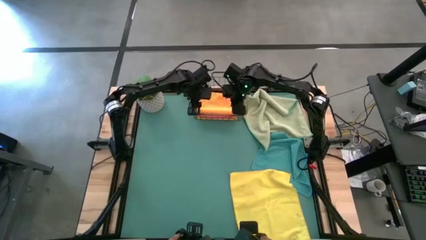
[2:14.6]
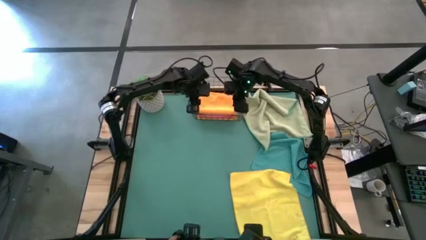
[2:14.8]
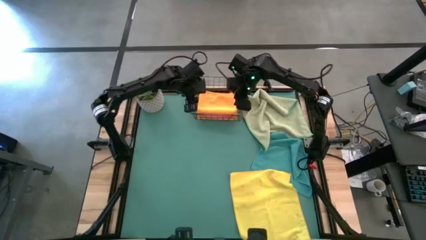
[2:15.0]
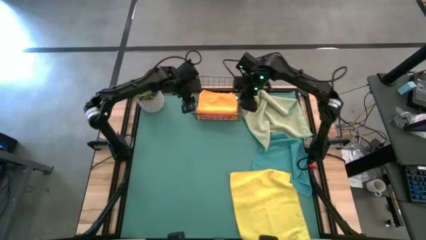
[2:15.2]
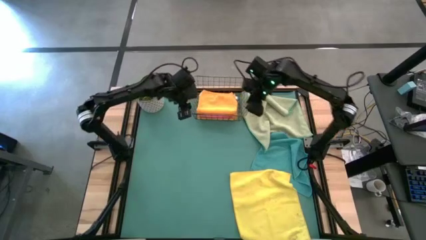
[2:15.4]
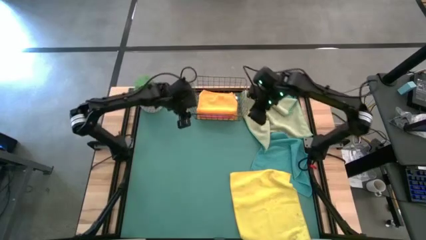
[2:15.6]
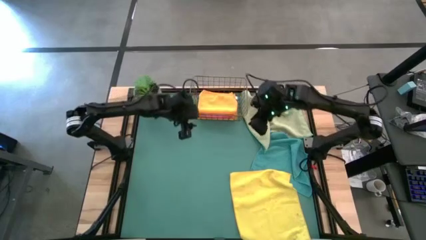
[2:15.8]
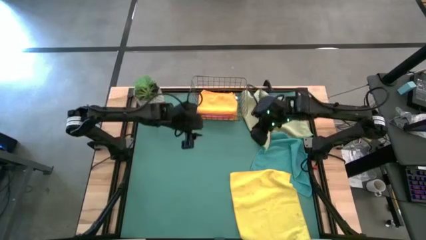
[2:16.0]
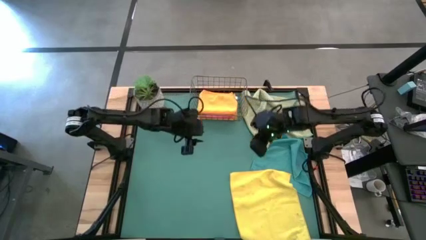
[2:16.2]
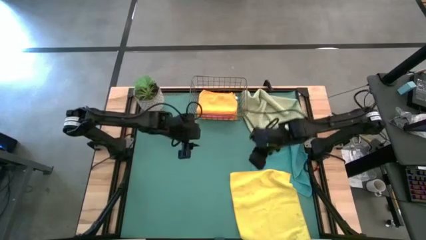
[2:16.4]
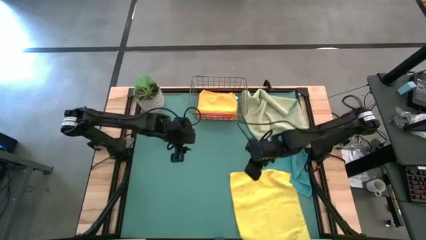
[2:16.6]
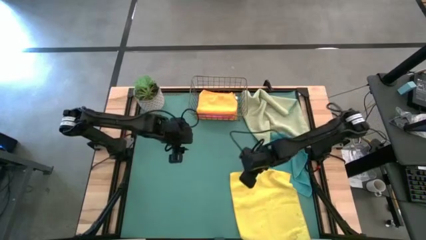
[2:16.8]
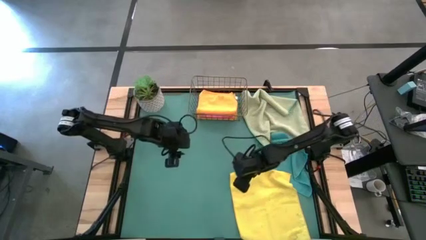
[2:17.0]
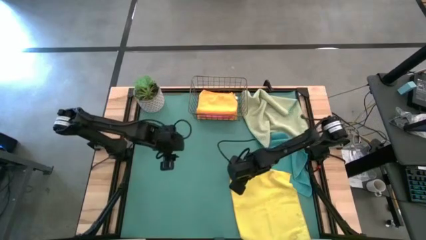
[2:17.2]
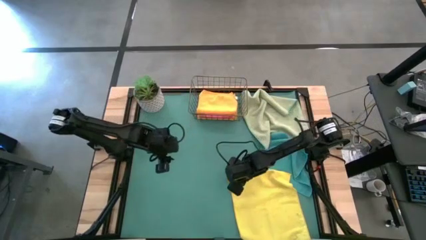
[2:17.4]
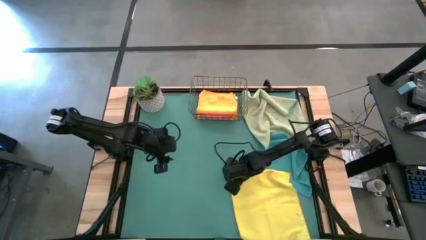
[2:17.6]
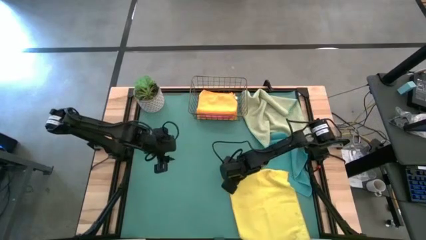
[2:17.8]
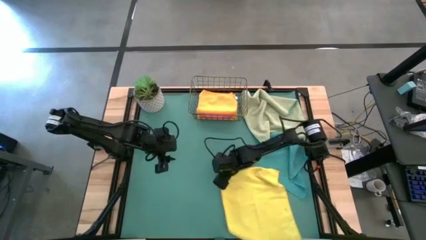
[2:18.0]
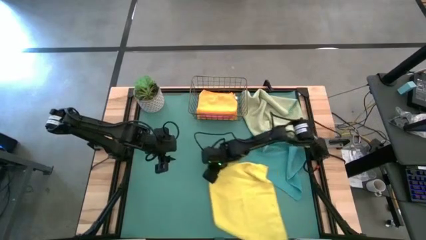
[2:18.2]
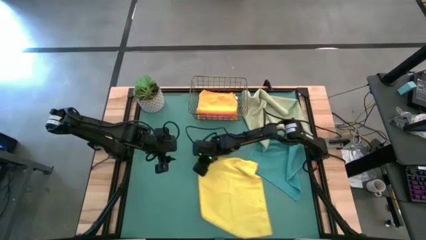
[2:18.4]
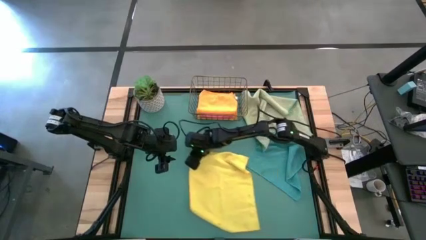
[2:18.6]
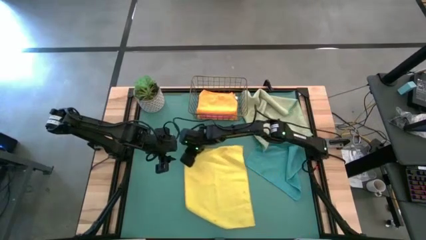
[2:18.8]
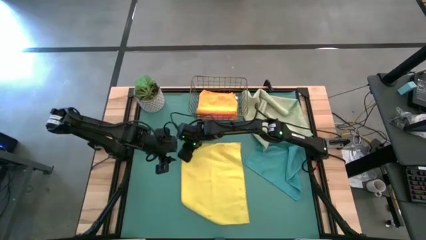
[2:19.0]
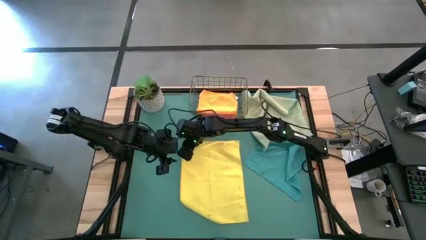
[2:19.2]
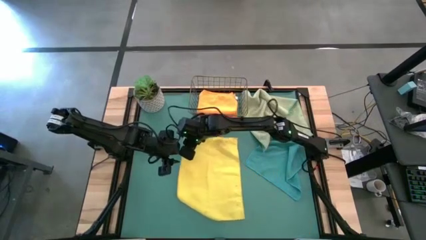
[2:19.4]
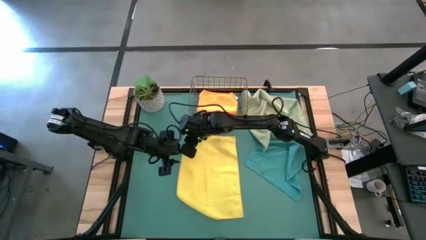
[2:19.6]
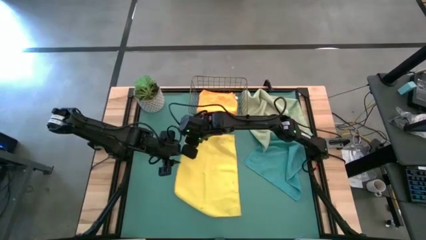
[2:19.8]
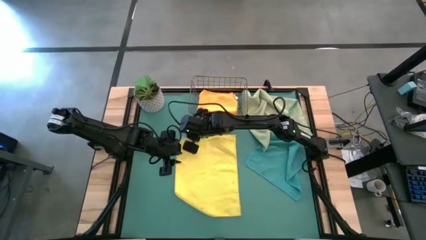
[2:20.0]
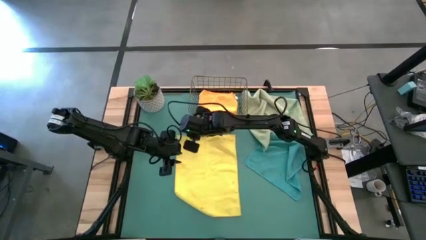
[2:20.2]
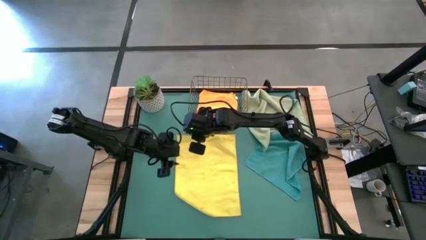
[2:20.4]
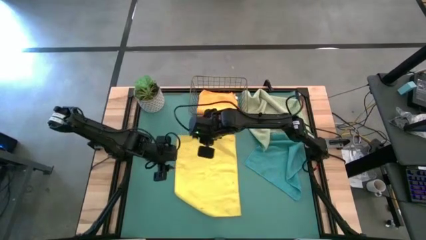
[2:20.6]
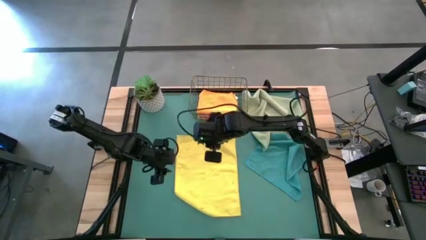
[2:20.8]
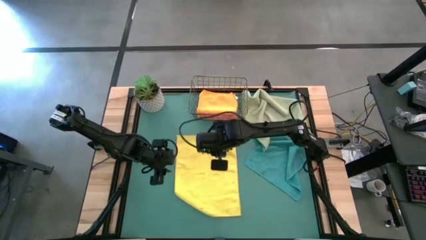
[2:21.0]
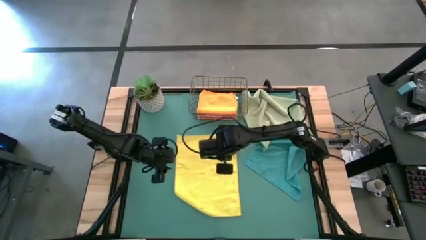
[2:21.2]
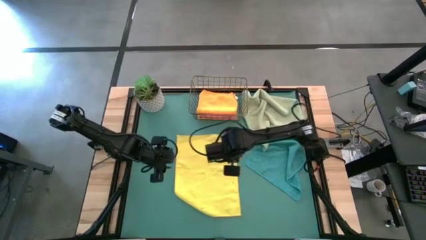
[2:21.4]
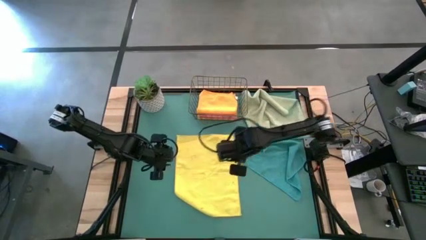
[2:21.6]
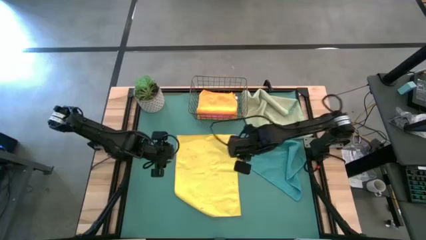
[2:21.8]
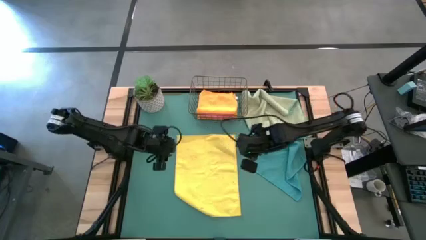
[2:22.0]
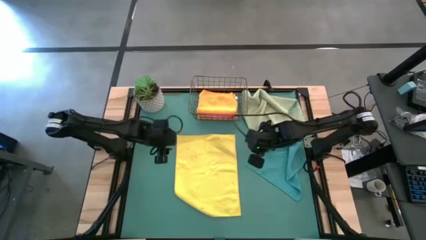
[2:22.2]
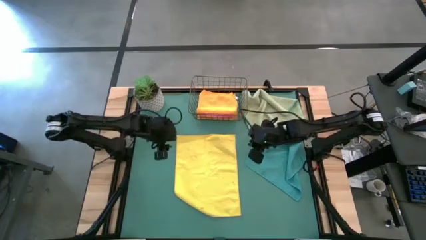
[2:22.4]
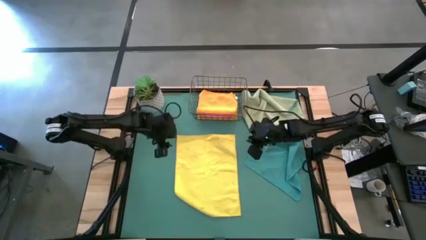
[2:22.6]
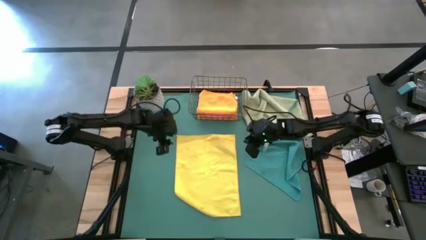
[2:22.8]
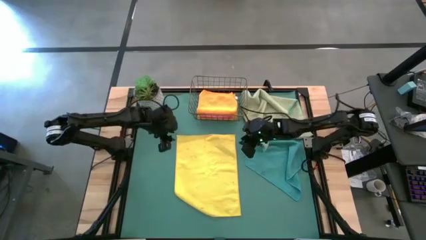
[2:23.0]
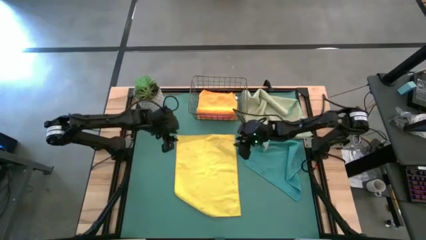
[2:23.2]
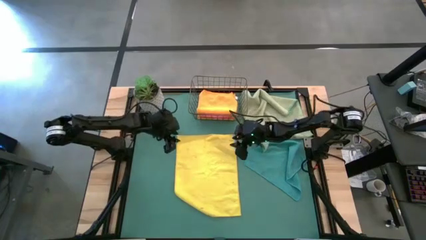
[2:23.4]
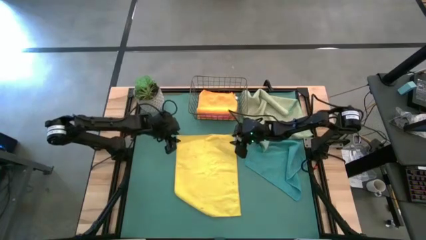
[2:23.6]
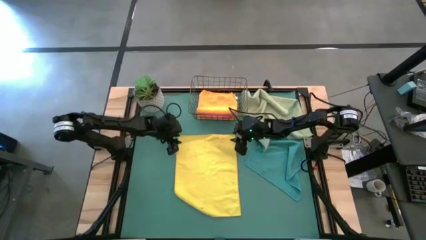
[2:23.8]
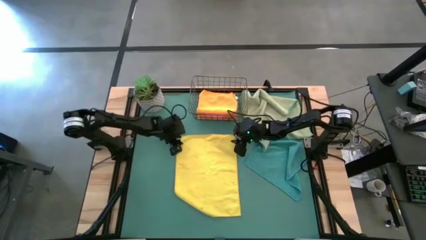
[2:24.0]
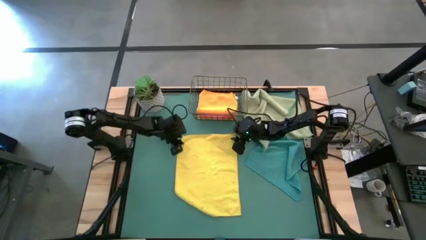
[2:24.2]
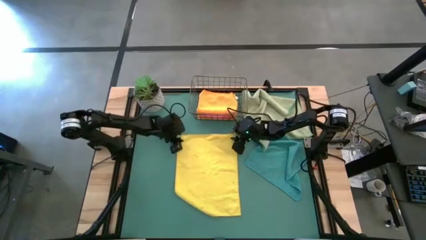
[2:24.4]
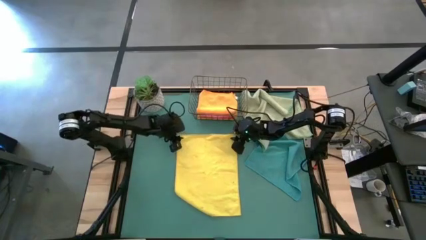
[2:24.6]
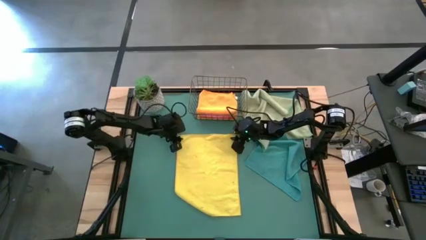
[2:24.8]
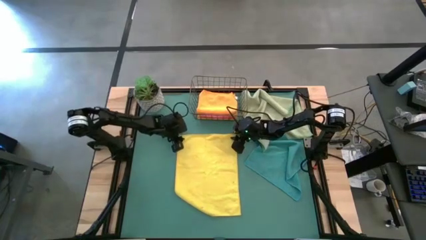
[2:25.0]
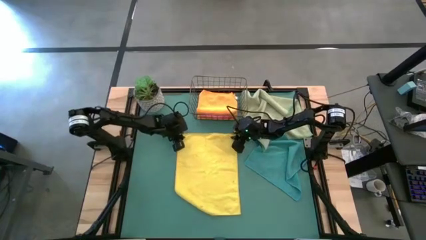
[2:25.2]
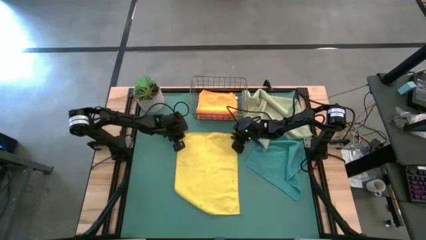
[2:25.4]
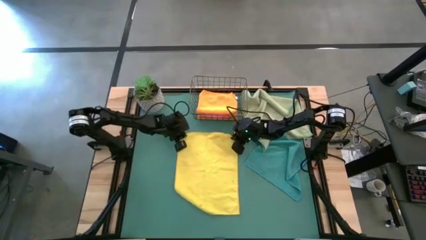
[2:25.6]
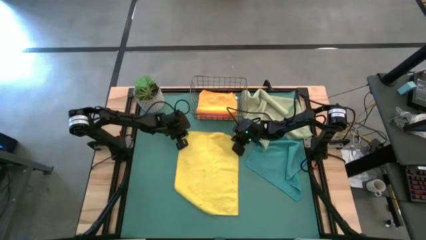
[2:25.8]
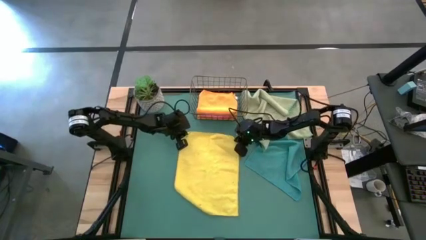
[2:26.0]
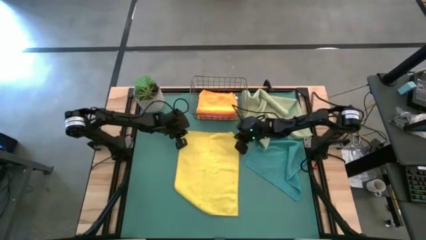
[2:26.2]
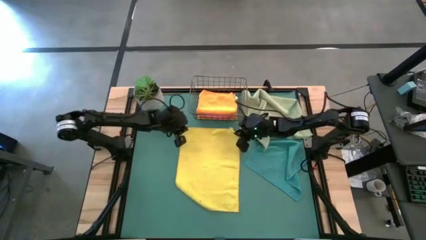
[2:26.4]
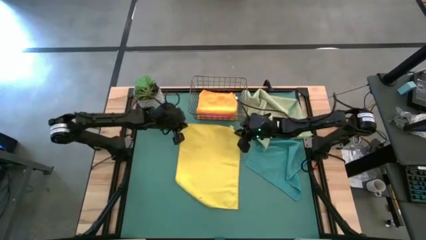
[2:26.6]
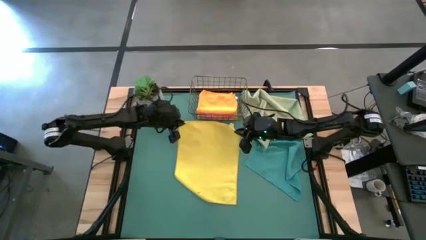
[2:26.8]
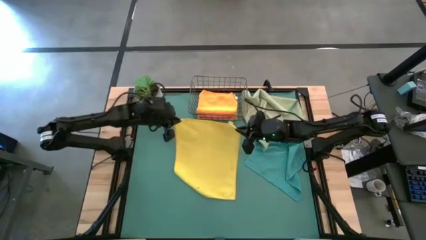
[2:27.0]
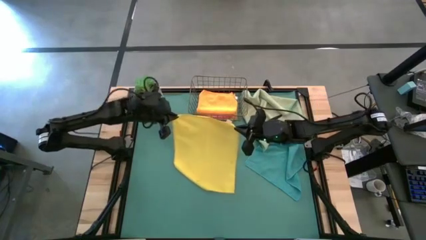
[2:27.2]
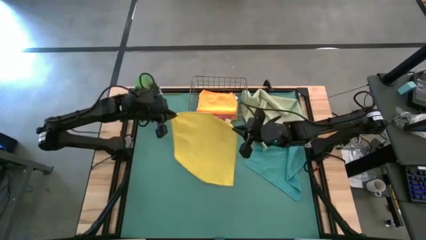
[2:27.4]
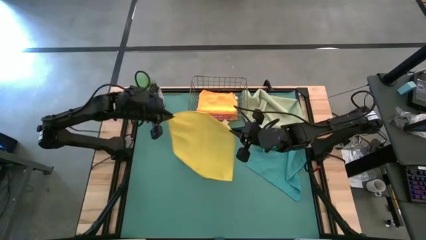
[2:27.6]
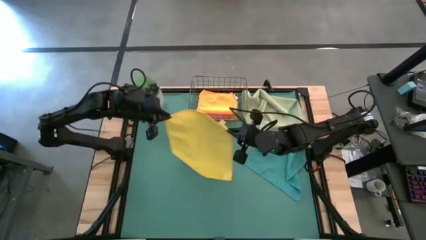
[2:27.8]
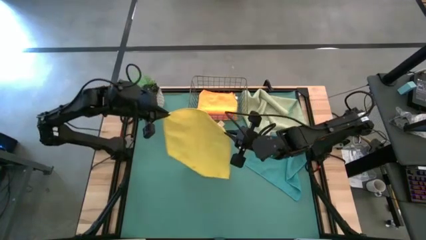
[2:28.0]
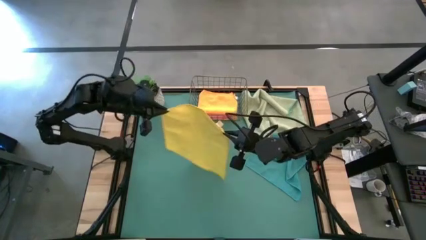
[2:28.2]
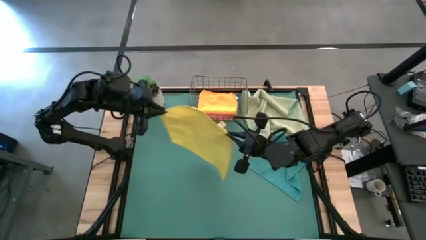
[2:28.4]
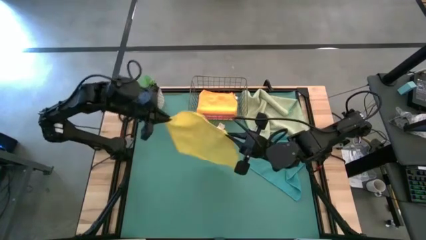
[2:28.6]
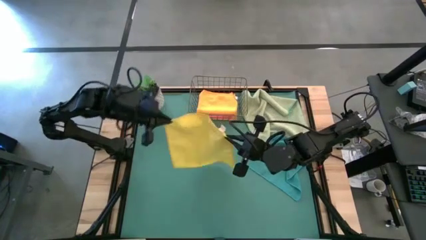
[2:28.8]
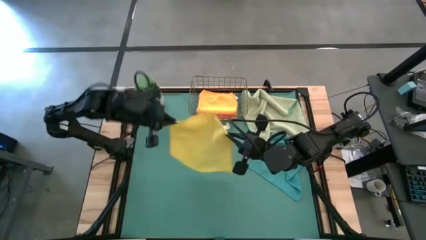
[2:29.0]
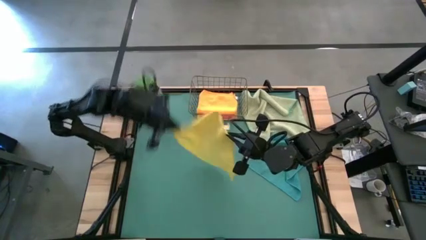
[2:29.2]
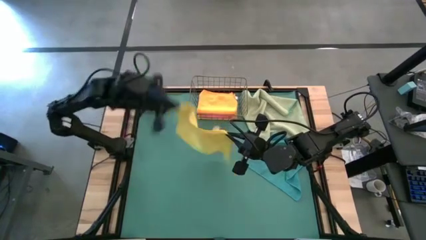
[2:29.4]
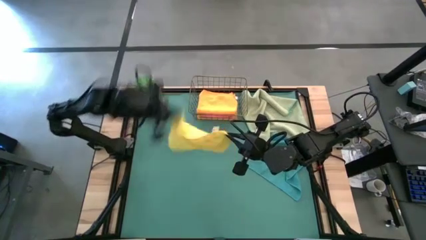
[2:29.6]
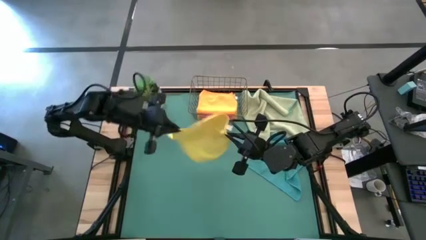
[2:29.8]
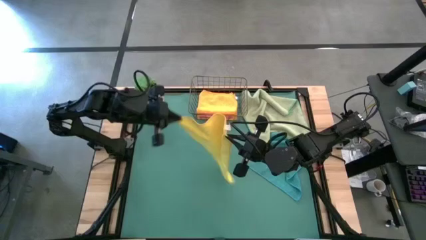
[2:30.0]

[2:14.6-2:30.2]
Task: Fold microfiber towels
Fold the yellow microfiber towel
